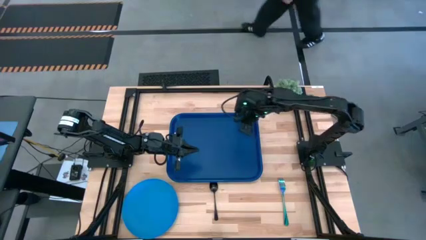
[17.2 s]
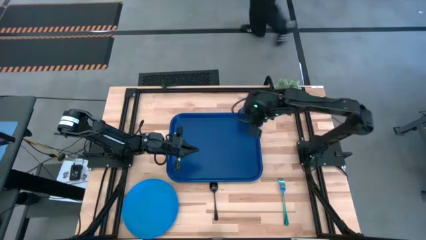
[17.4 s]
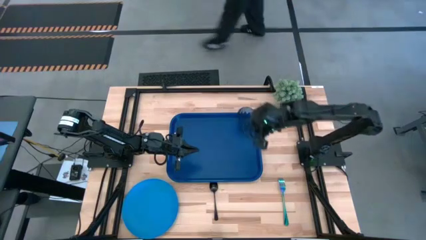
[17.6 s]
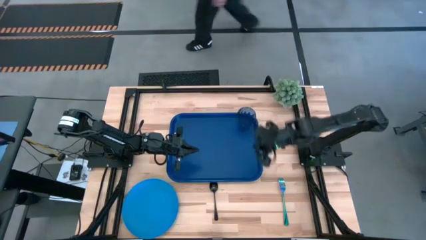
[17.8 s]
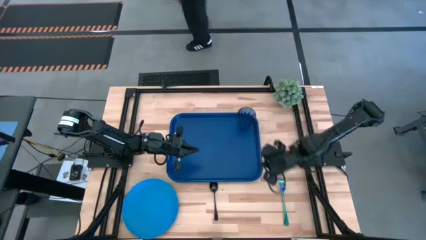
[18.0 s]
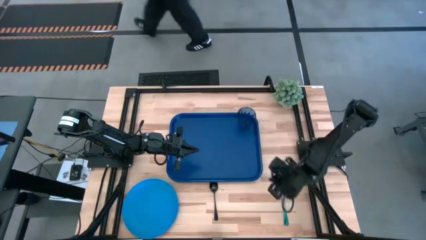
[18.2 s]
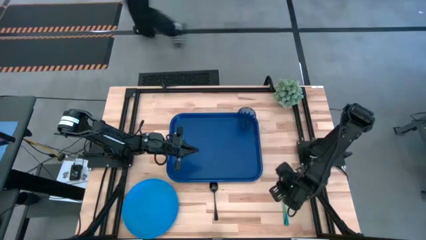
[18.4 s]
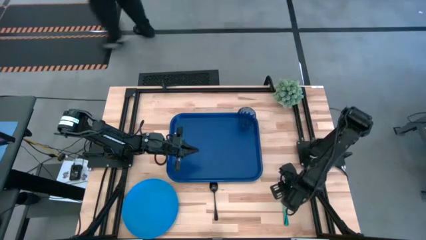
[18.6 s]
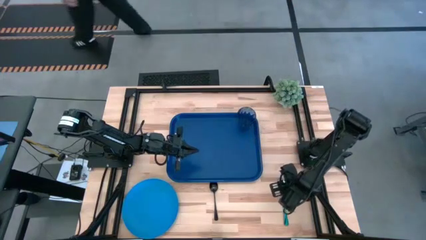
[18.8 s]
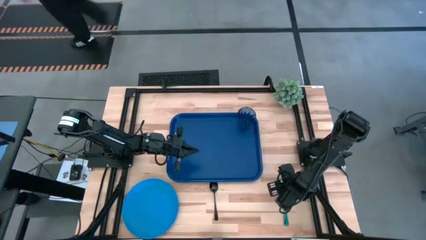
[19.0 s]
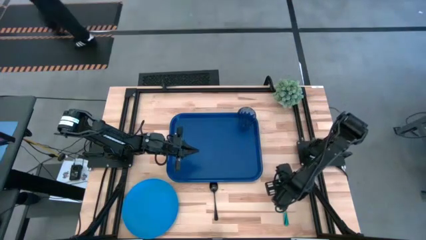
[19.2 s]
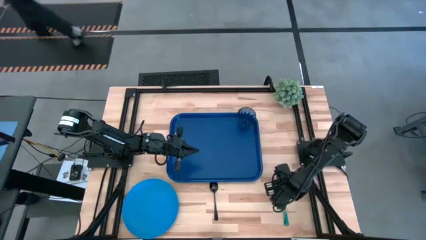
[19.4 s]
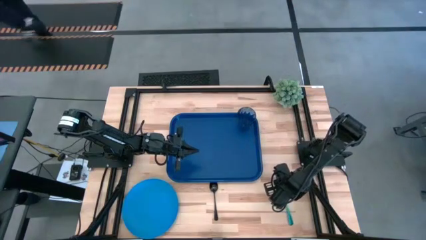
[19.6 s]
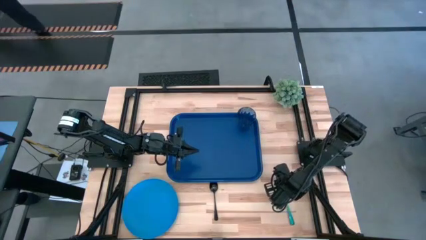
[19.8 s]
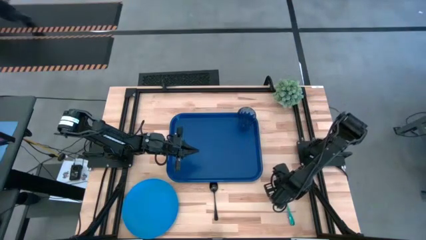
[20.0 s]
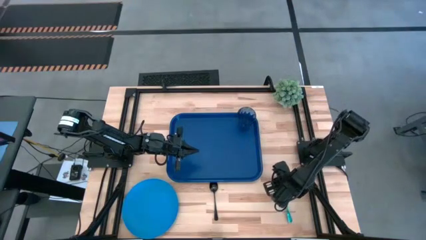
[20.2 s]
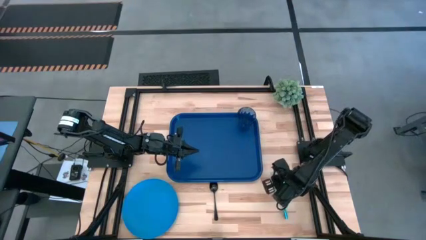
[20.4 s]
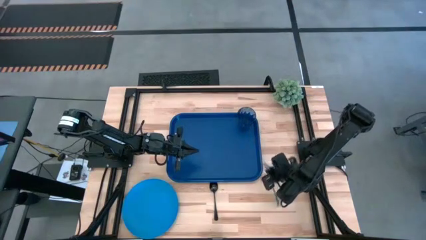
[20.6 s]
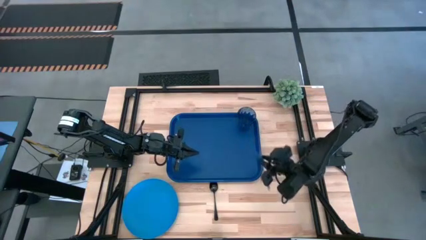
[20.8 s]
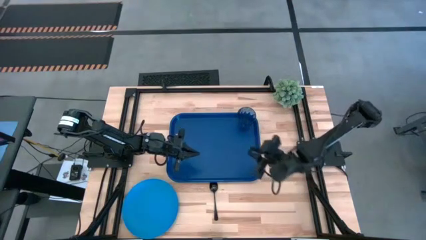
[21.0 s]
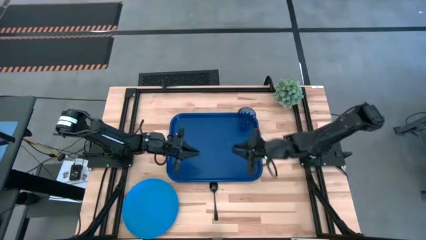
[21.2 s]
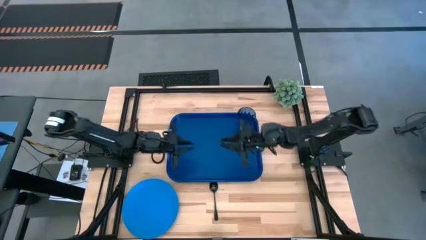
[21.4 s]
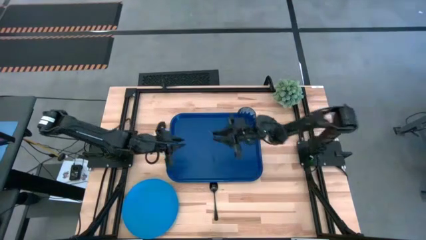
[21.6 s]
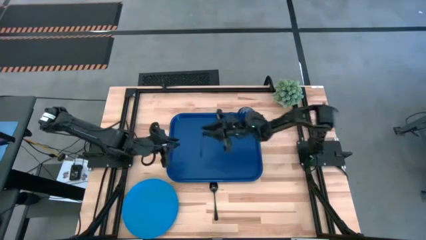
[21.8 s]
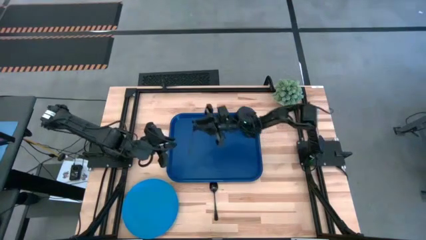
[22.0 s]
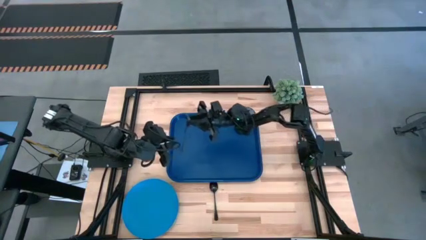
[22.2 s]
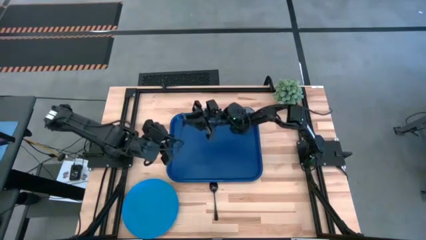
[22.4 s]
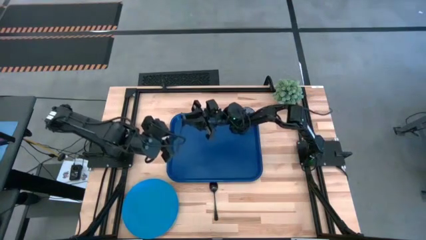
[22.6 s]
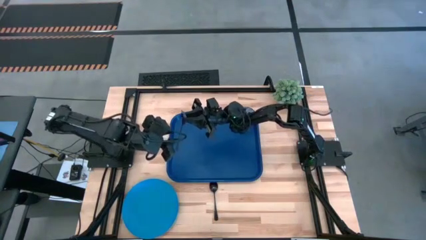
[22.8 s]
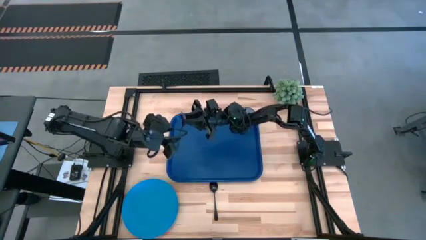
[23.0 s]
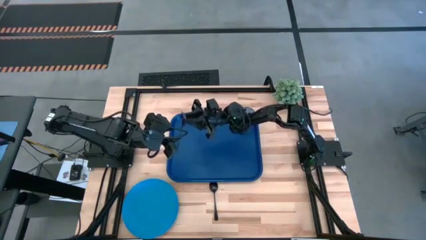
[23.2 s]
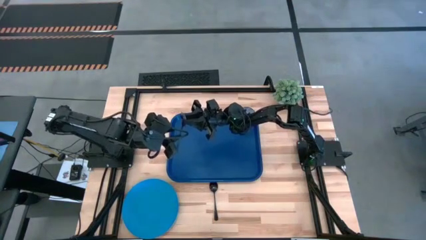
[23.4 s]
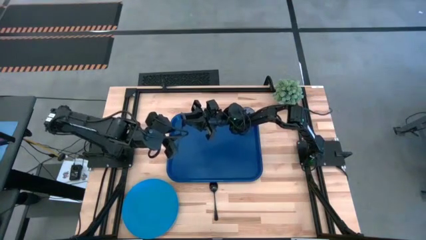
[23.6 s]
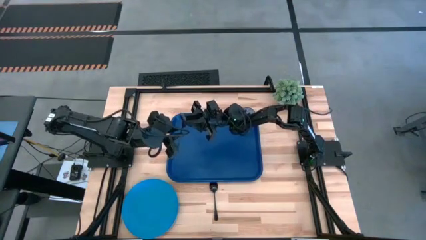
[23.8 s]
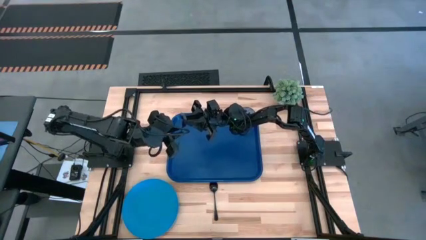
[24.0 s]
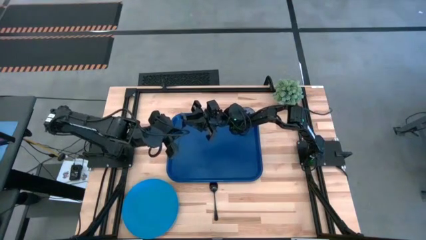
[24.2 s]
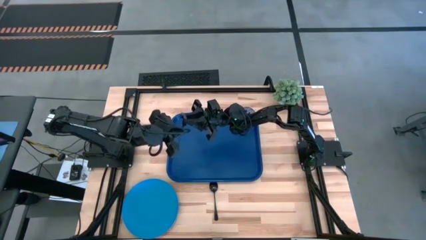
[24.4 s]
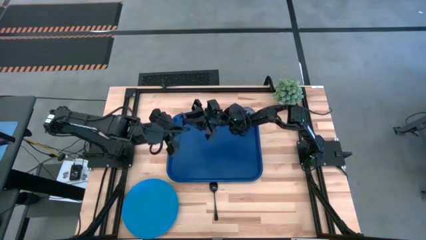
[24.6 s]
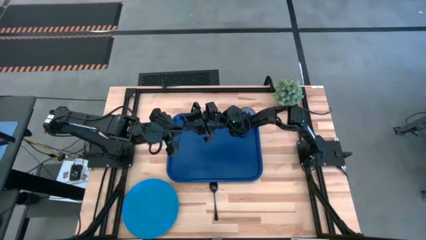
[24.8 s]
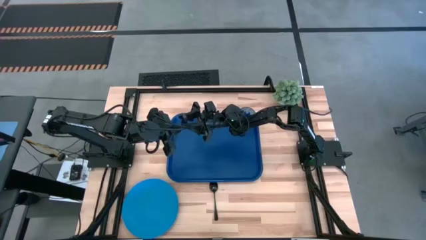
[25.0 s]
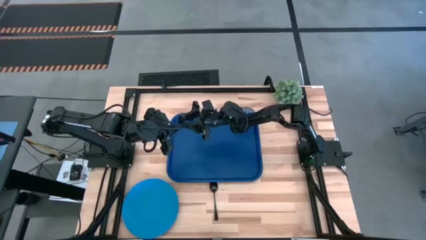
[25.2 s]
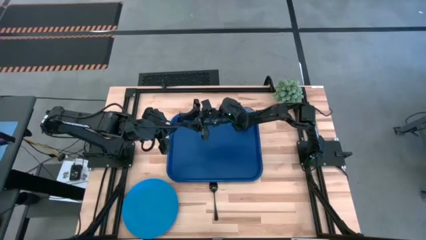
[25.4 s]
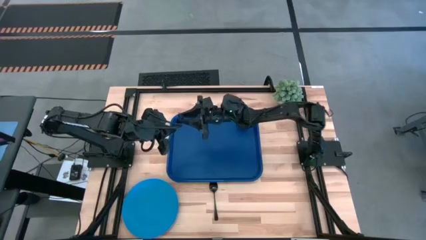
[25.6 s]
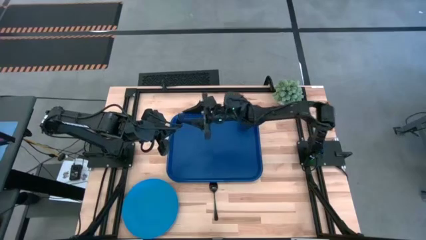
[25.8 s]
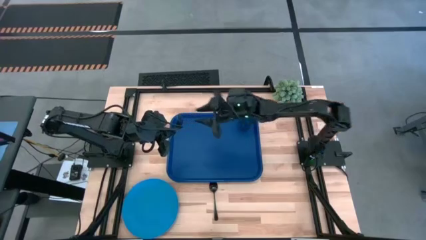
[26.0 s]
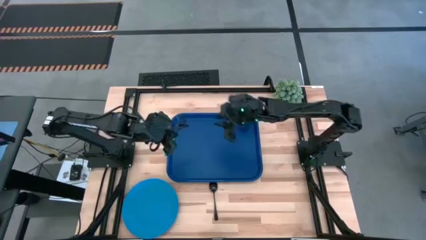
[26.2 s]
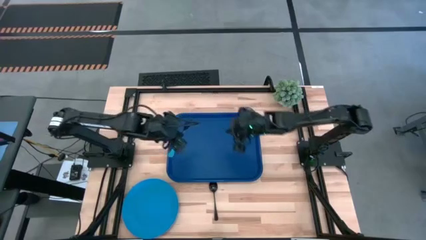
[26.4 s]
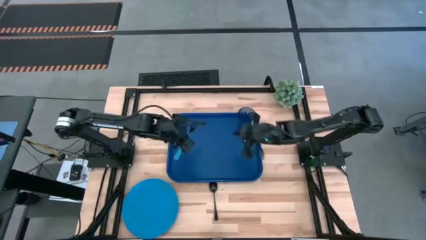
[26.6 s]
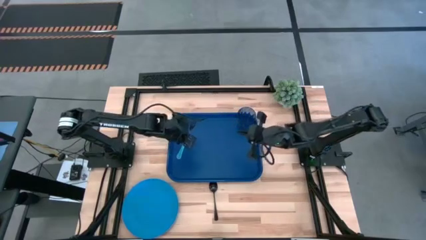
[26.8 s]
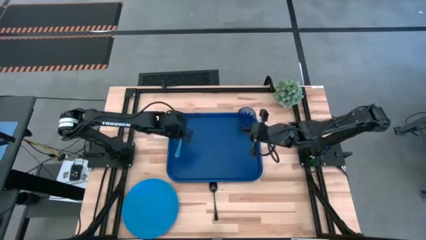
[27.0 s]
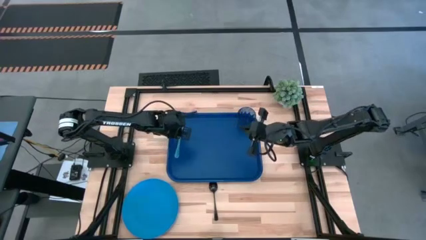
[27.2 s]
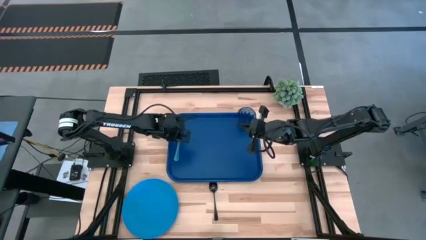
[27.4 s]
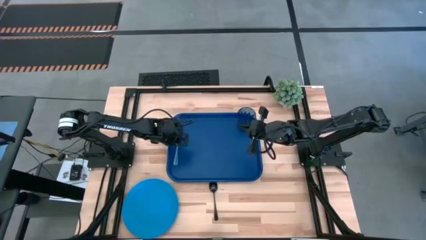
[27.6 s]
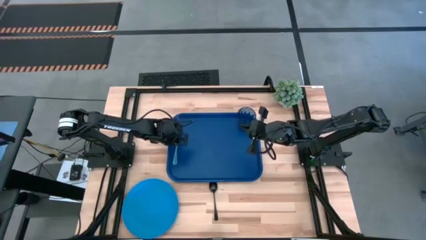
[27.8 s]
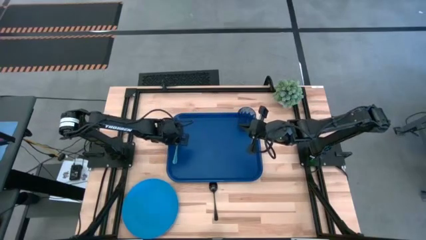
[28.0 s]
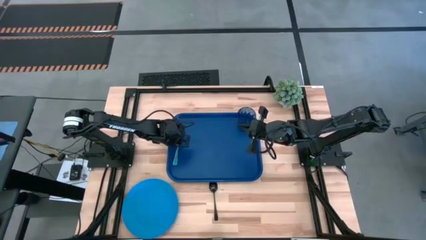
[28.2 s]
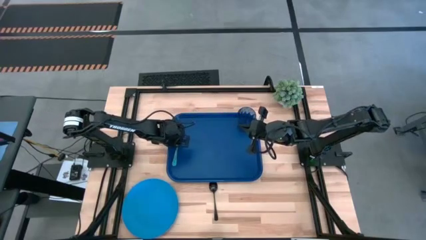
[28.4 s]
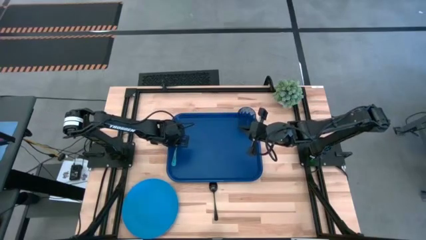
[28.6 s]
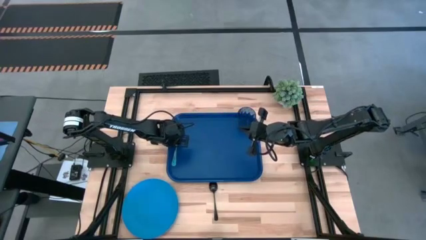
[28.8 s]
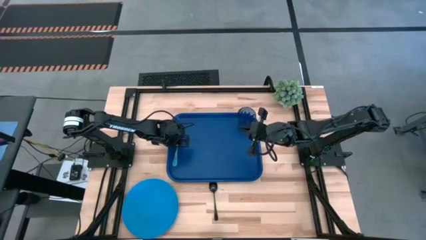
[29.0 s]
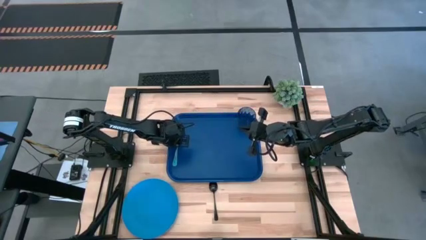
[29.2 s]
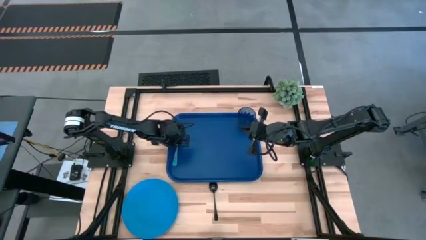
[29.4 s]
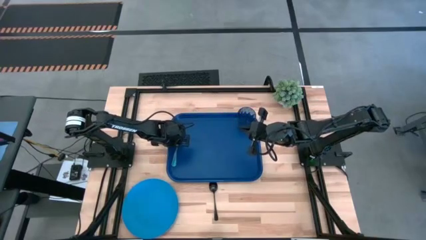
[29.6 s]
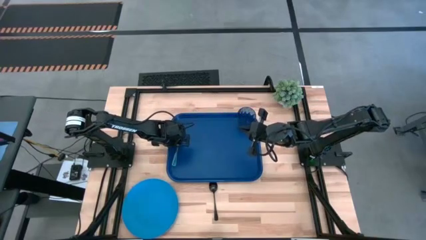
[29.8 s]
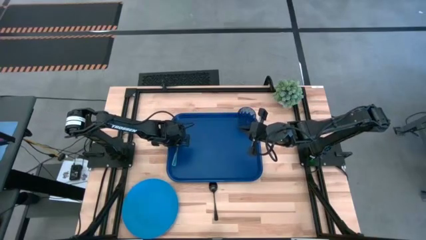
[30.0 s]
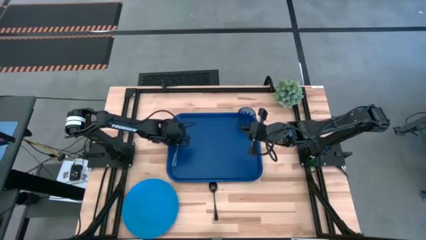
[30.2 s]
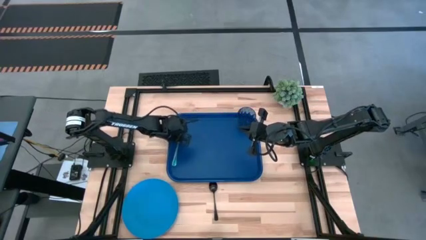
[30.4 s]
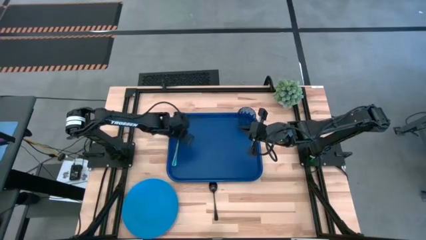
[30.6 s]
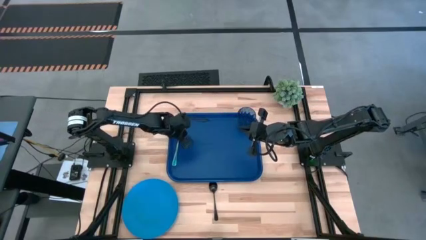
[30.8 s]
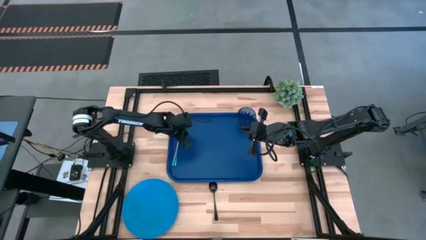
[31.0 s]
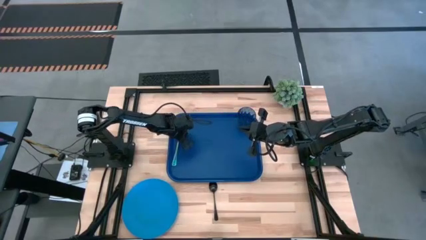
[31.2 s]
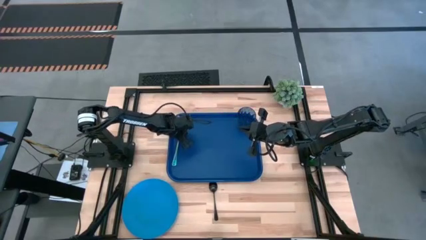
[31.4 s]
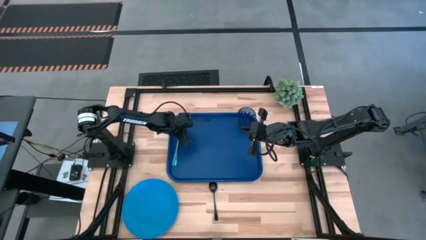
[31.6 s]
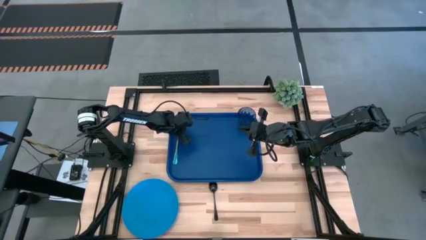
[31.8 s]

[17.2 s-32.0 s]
Task: Pick and place plate/cup/fork/spoon on tray
Put the blue fork on the left side of the blue tray

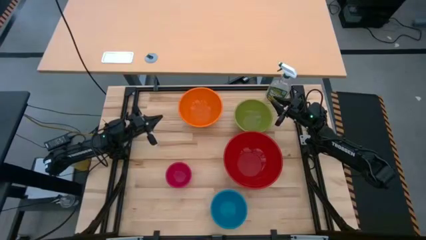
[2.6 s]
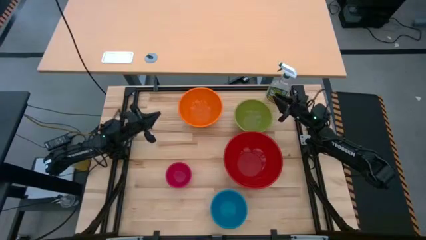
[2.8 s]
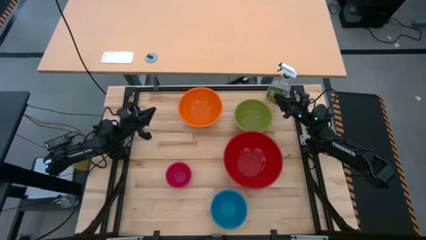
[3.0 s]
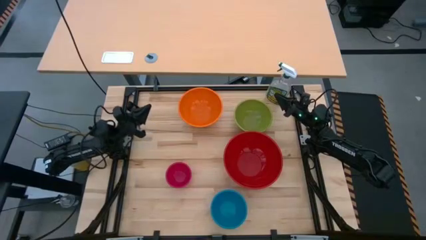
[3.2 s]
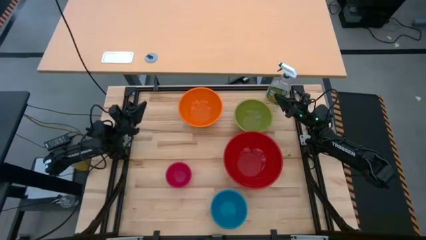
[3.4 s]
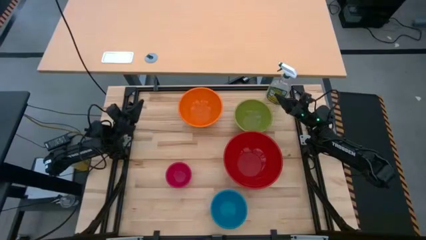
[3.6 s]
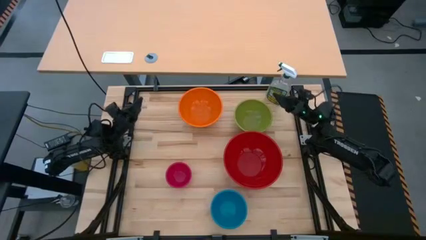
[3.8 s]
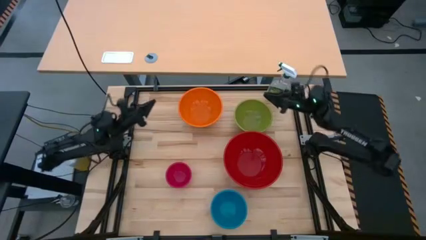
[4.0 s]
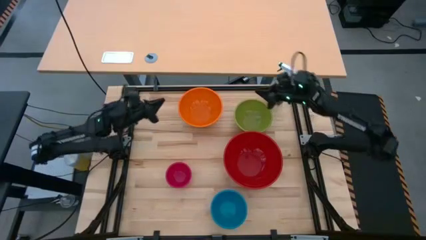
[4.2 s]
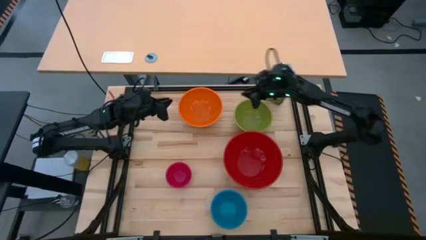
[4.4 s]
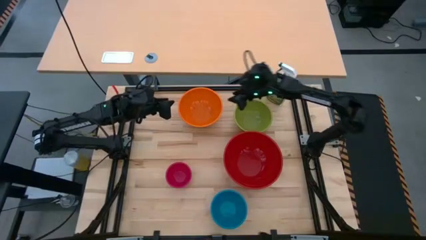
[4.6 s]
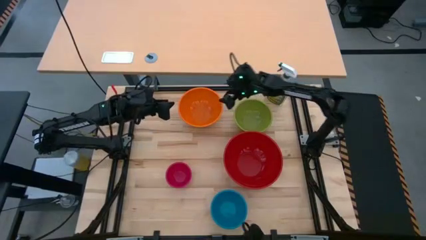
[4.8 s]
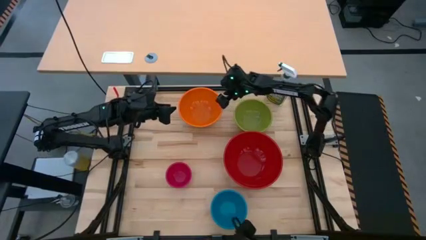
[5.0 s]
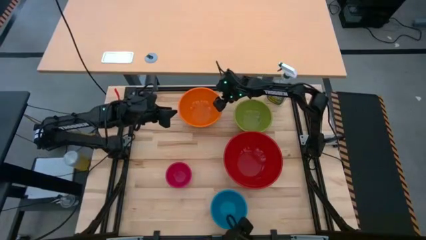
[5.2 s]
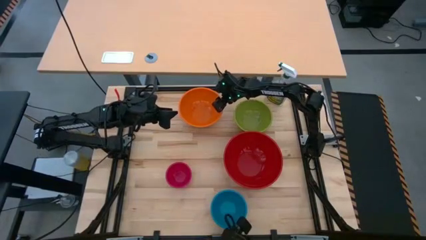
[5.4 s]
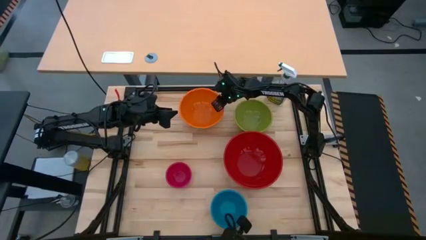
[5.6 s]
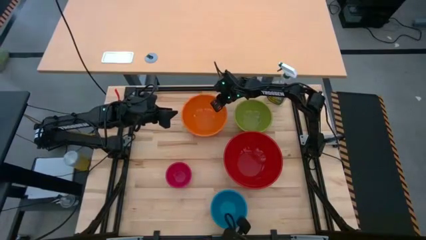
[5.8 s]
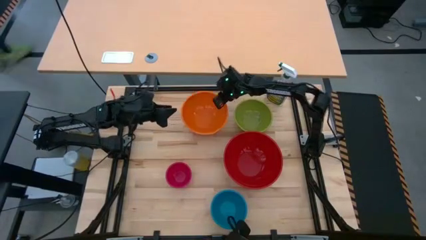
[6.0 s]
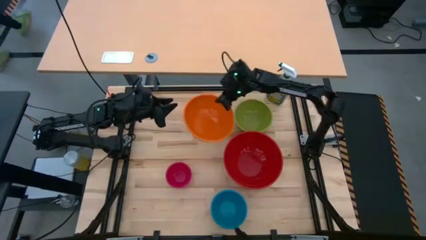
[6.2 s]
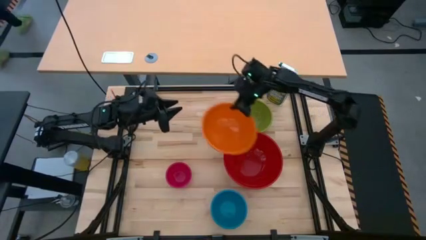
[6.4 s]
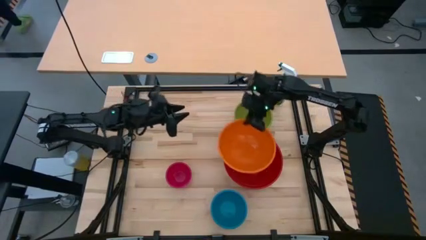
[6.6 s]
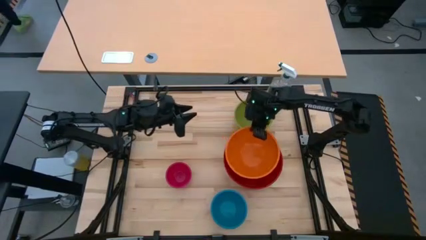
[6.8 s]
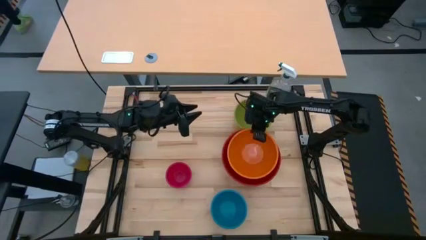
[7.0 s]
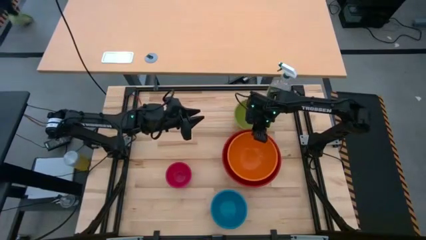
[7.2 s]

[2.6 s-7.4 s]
Task: Nest bowls inside each other by size order
Stack the orange bowl on top of the red bowl
